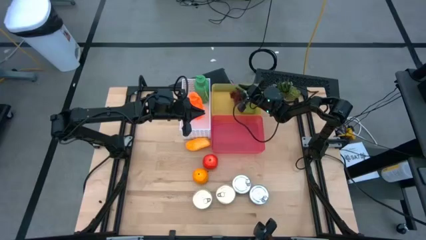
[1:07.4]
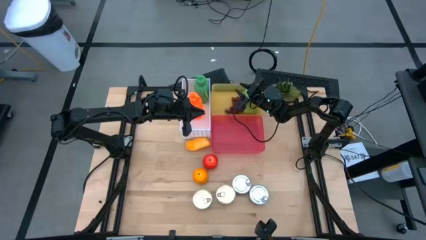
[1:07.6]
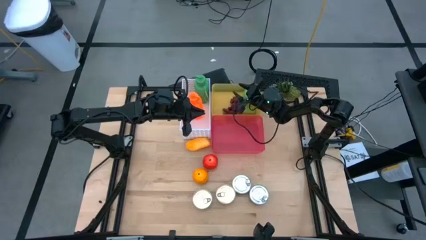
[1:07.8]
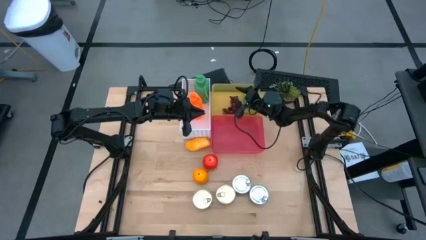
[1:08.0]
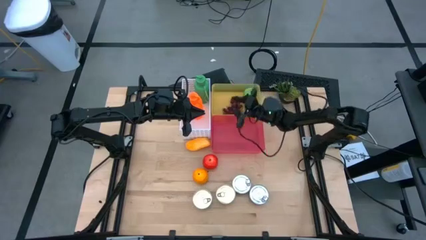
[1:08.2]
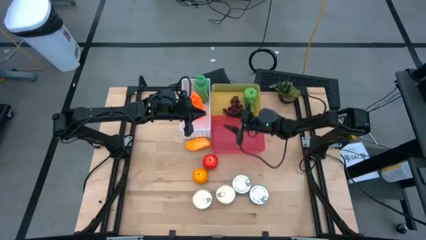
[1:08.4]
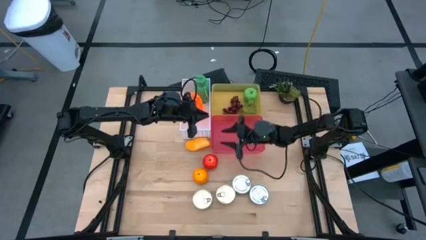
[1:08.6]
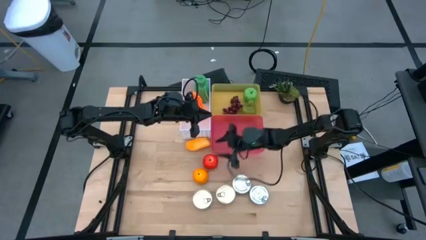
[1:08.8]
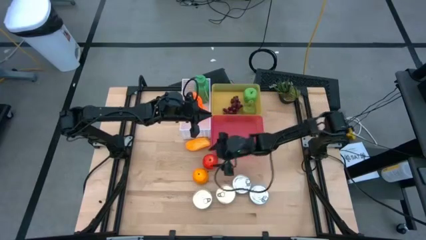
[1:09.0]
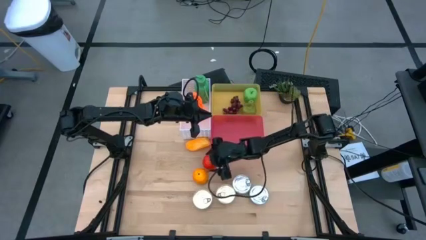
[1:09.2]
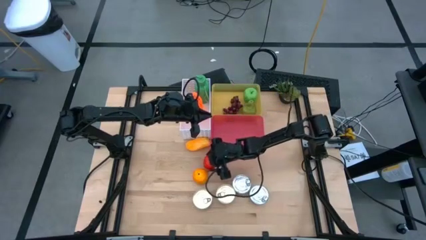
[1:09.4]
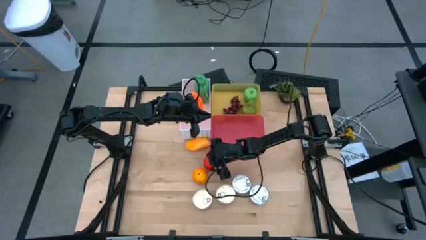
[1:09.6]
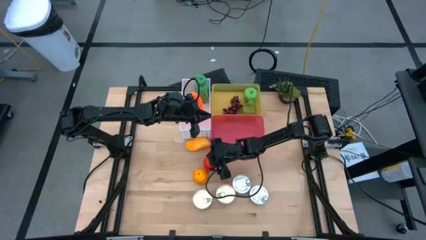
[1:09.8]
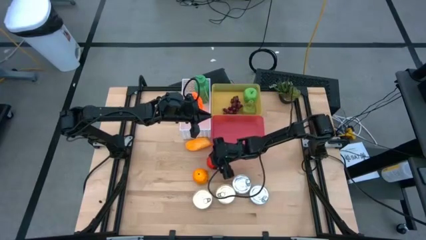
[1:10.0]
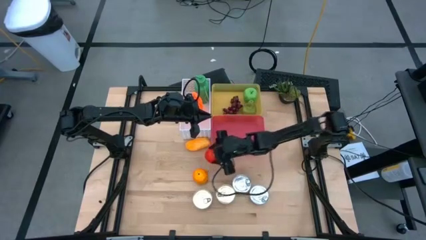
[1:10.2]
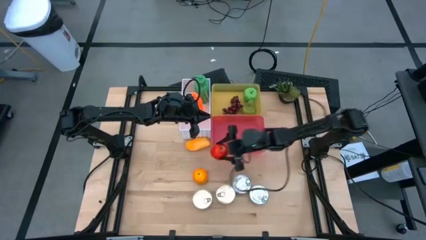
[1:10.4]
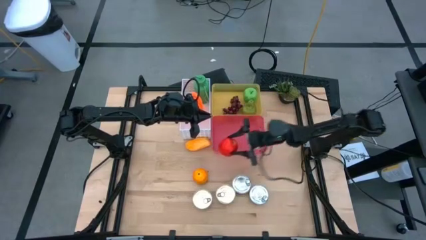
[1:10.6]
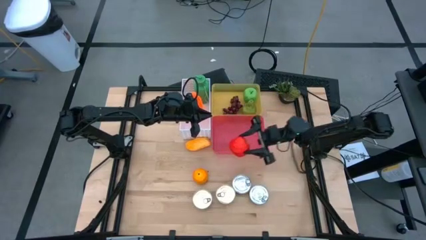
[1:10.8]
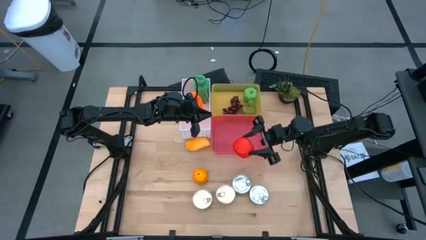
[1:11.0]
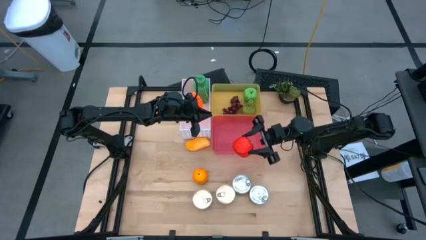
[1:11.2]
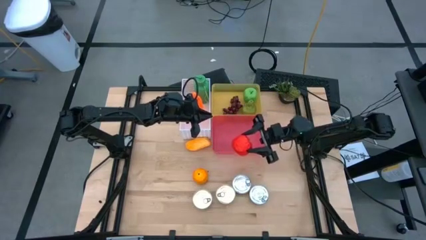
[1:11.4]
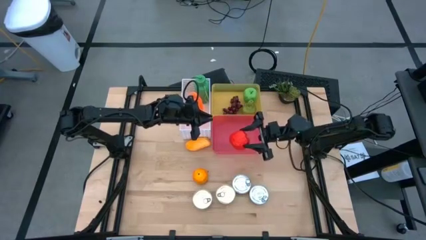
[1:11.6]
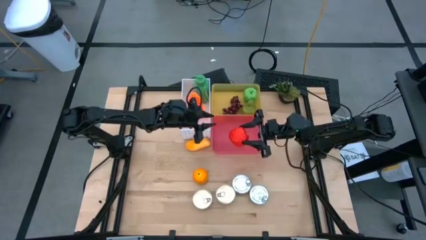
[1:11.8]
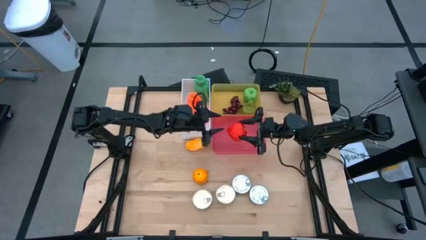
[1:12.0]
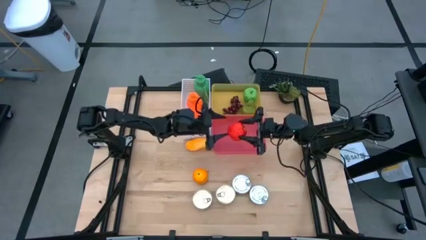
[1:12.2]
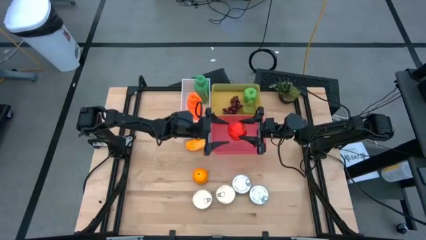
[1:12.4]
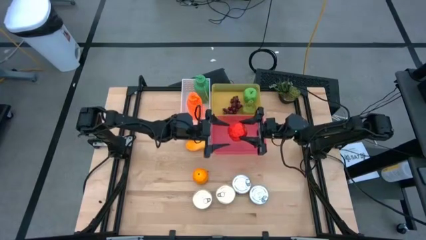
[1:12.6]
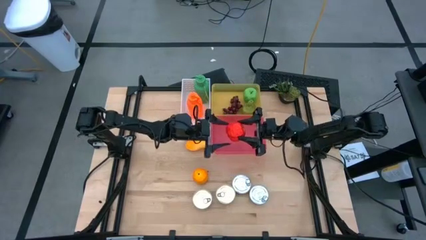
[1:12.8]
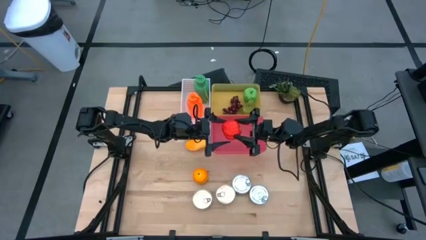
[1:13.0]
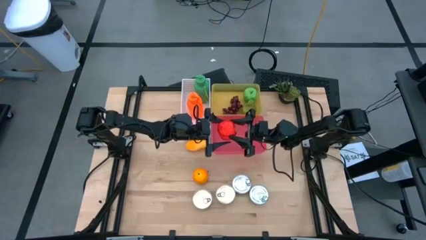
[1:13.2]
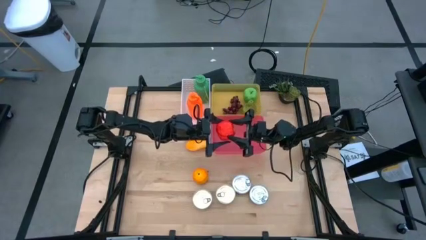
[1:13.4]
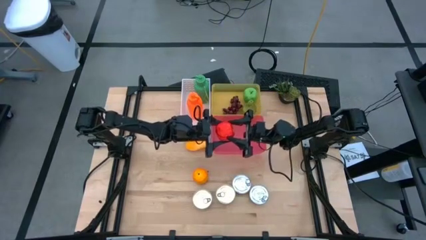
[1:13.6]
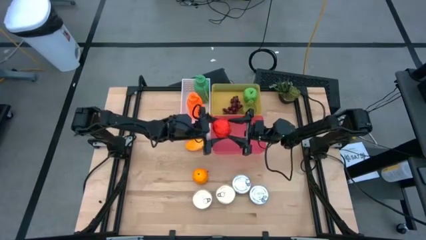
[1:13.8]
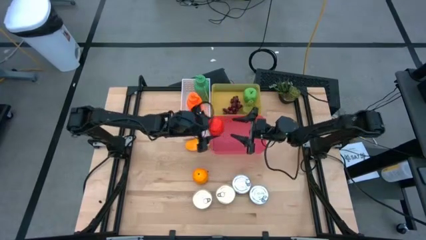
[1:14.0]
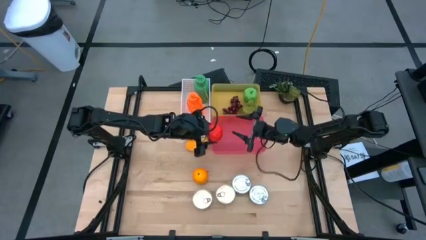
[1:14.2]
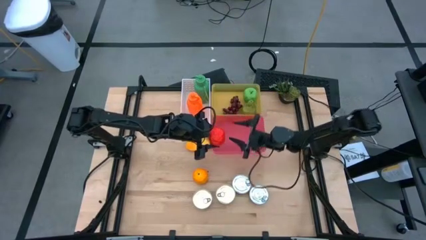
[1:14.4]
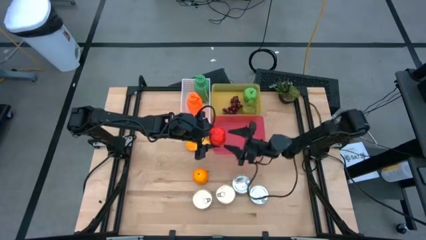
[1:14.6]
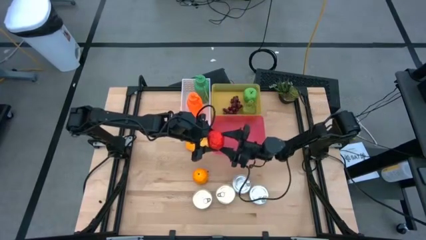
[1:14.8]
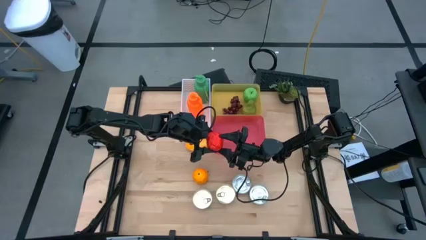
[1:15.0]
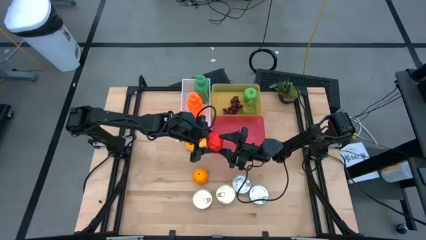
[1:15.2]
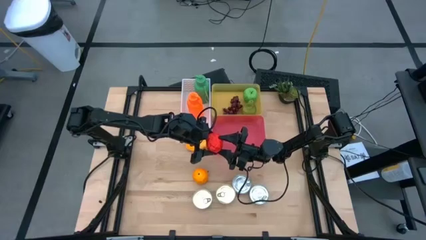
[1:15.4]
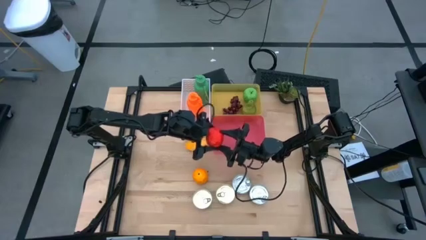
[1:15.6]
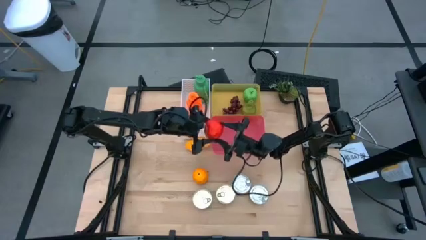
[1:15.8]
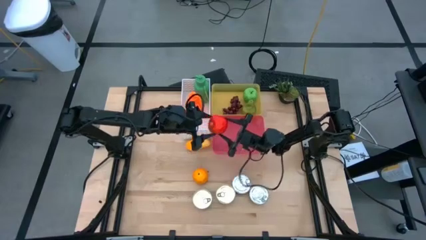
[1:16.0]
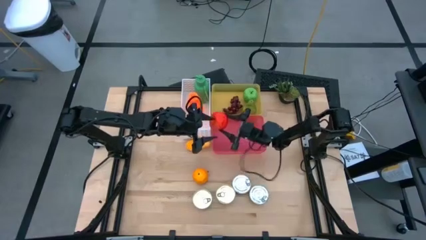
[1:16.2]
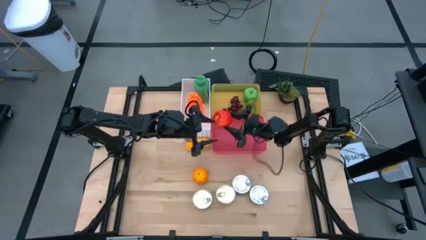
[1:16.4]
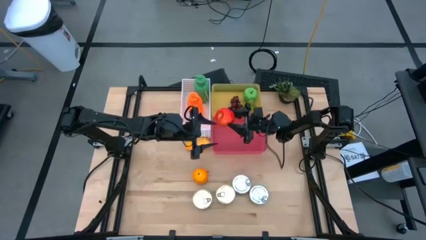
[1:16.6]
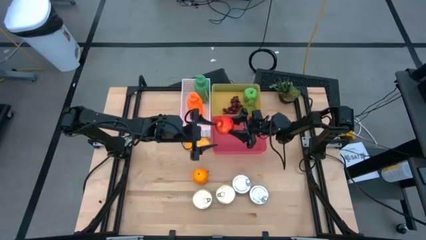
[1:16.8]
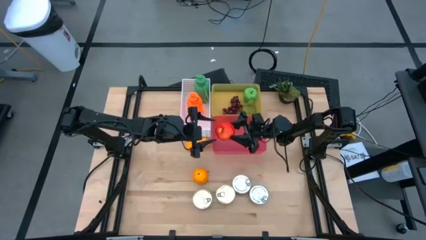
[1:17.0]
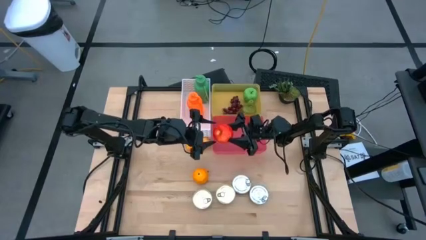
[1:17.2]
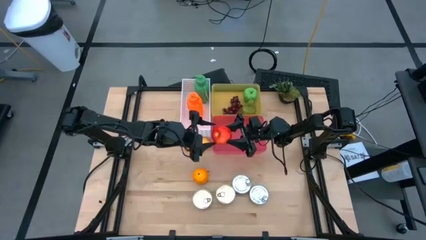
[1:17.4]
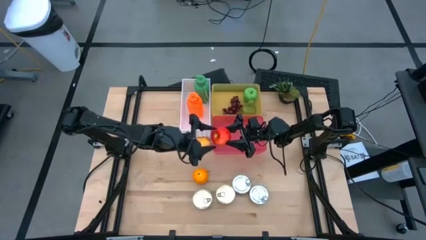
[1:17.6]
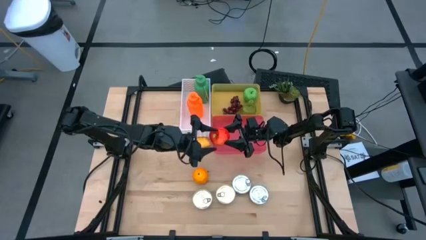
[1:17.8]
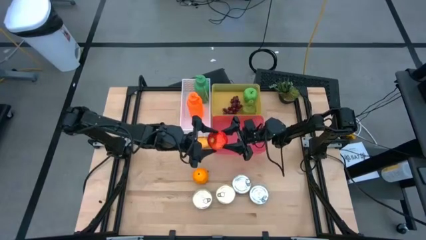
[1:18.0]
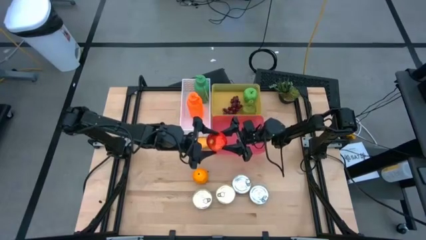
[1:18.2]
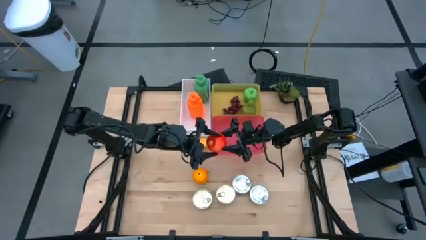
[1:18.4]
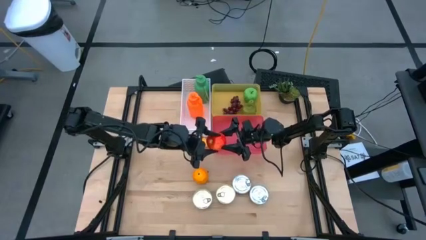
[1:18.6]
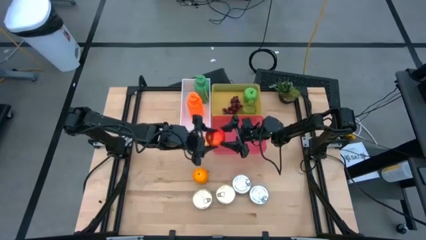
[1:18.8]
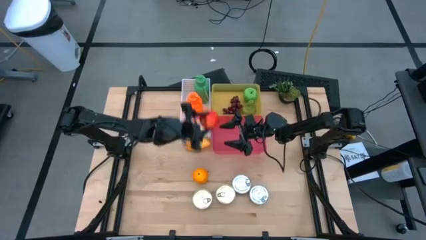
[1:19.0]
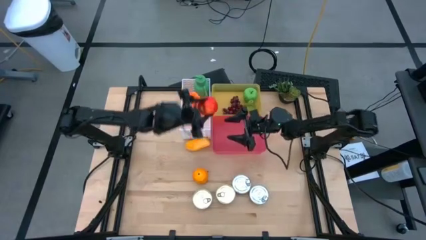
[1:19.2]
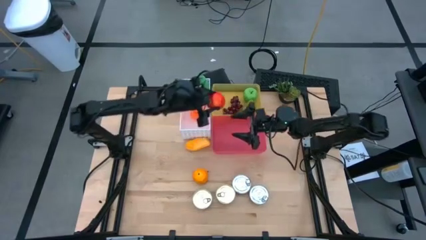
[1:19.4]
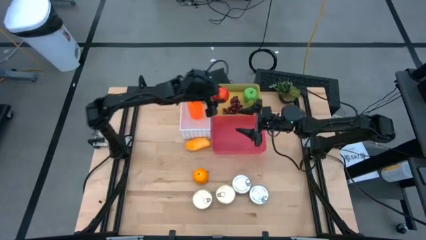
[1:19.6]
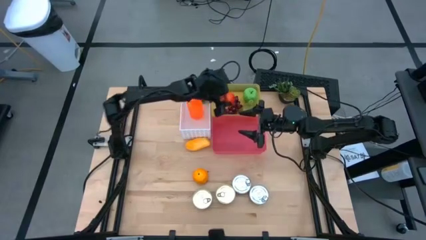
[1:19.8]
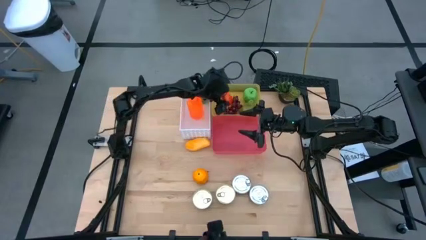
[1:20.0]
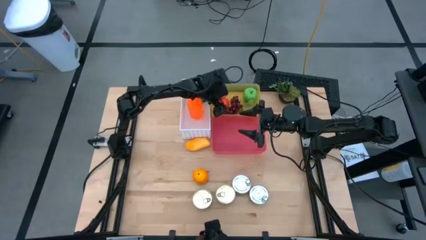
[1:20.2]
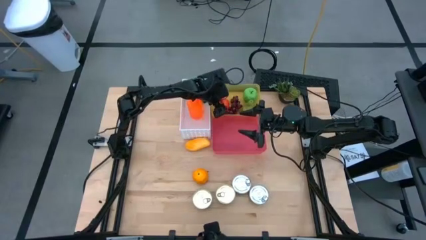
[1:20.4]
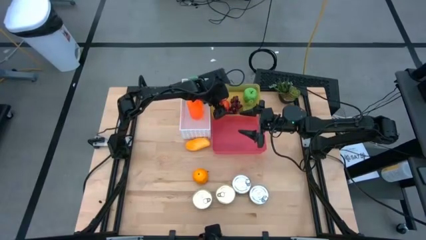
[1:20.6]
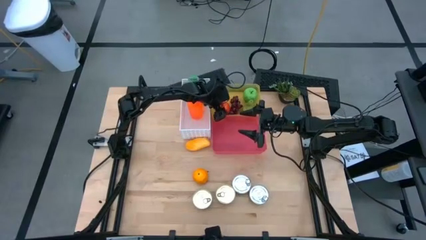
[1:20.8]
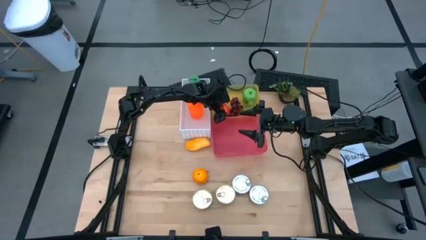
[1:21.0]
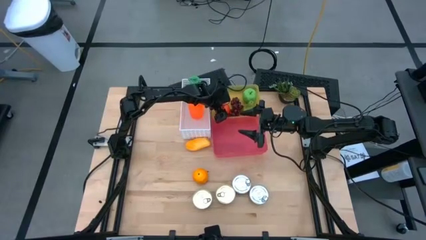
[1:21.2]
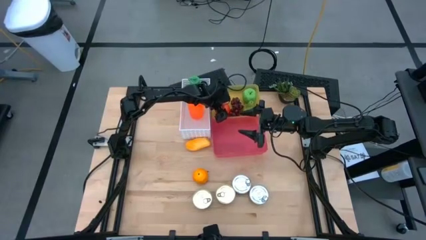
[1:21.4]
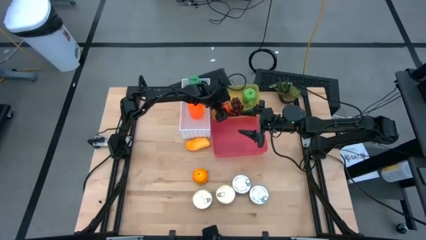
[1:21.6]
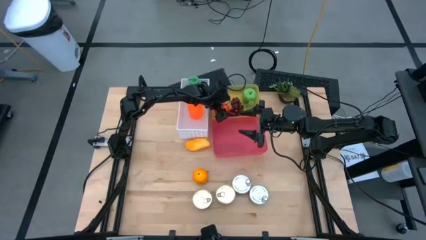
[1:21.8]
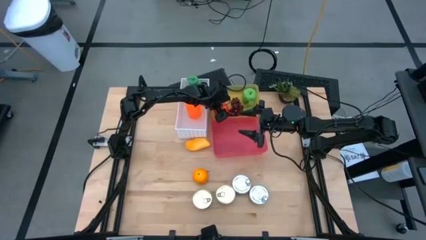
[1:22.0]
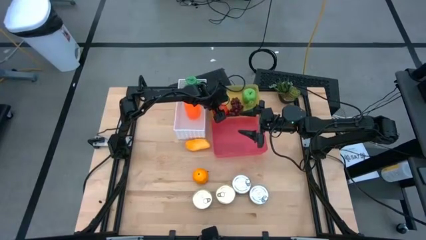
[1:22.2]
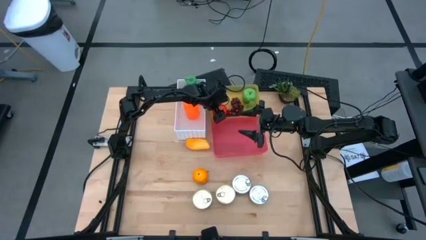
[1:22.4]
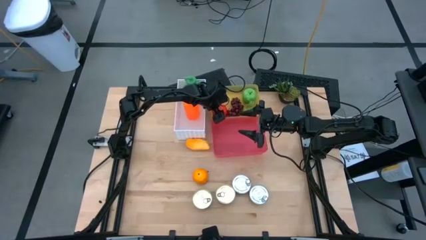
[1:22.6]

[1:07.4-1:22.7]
Task: Pick & Place Food Item
Put the red apple into the yellow bin
